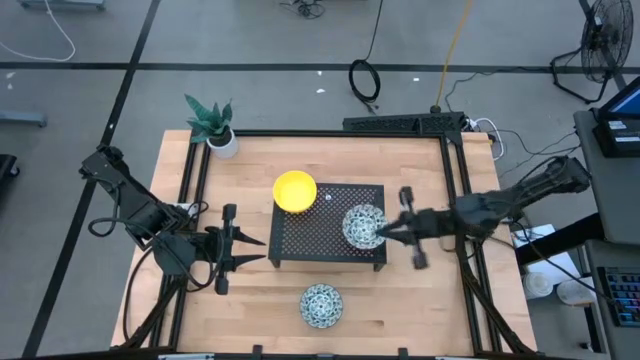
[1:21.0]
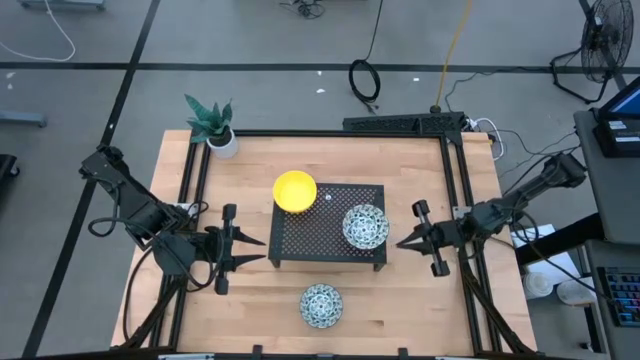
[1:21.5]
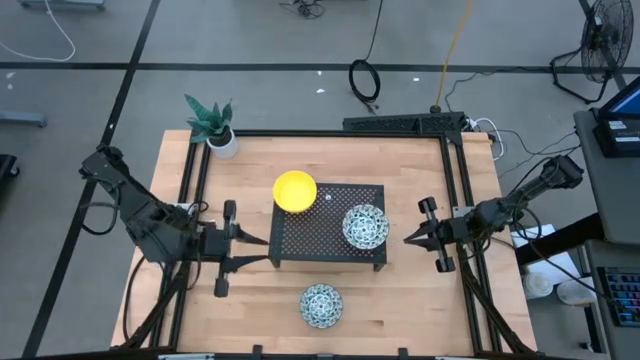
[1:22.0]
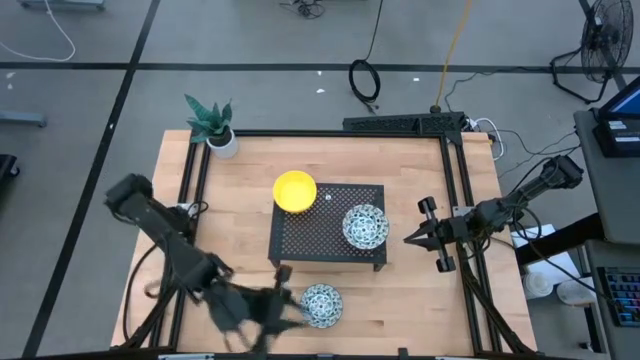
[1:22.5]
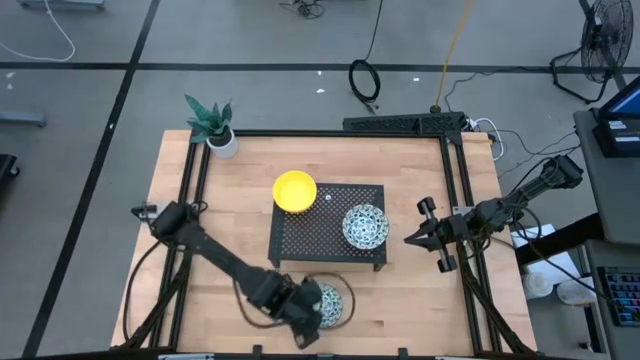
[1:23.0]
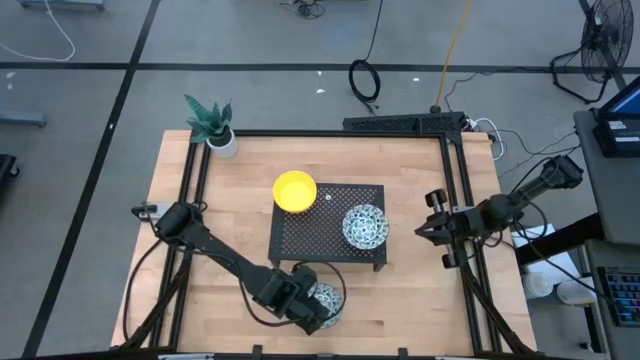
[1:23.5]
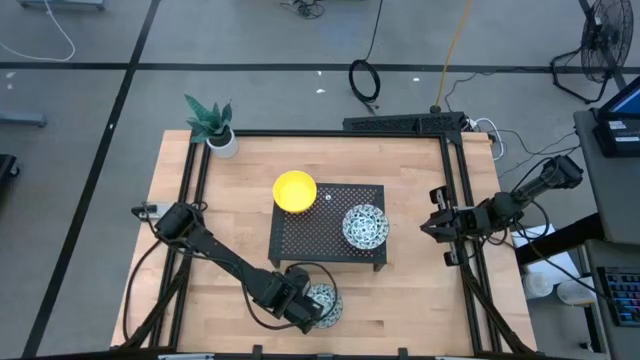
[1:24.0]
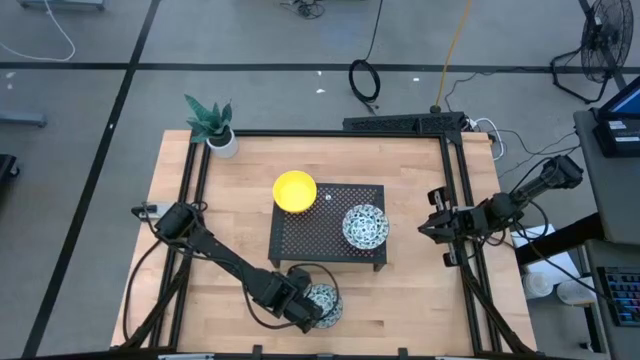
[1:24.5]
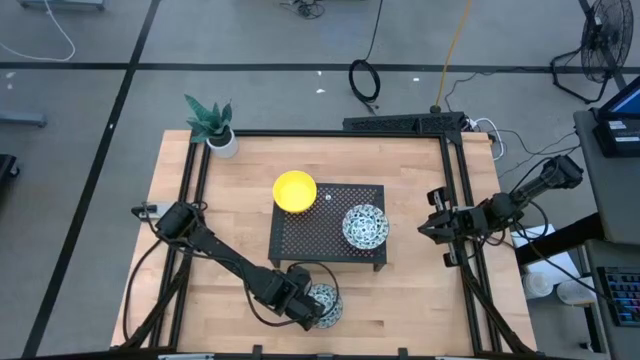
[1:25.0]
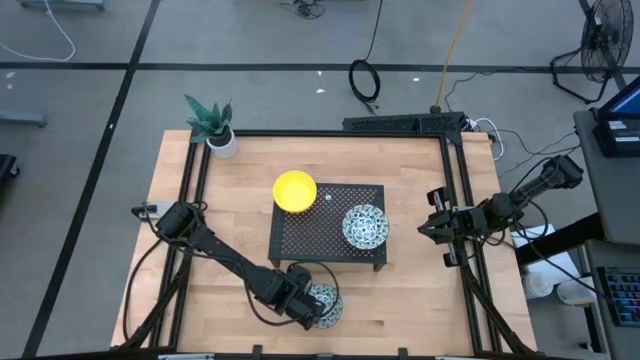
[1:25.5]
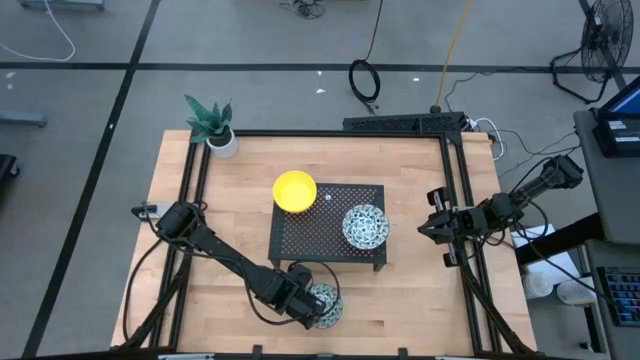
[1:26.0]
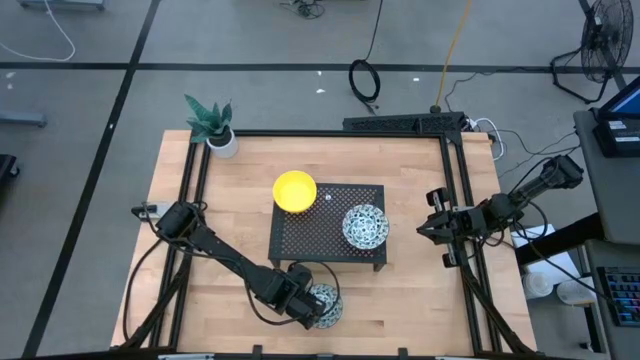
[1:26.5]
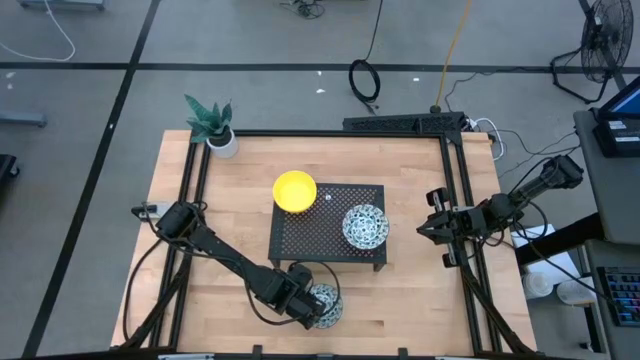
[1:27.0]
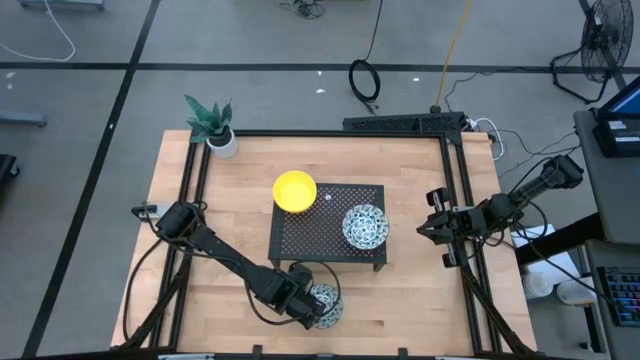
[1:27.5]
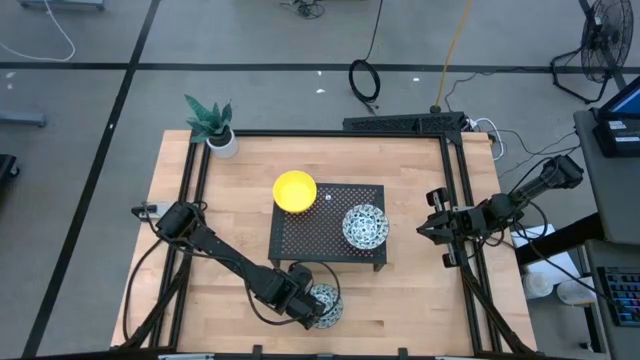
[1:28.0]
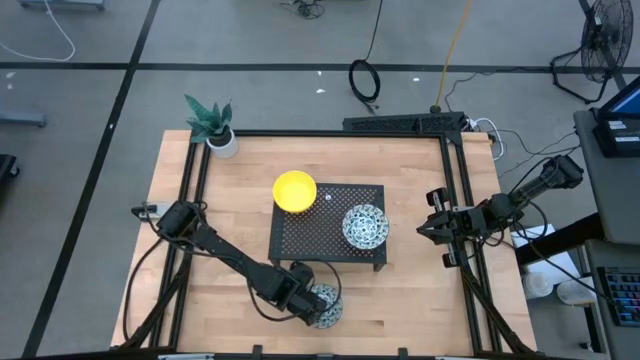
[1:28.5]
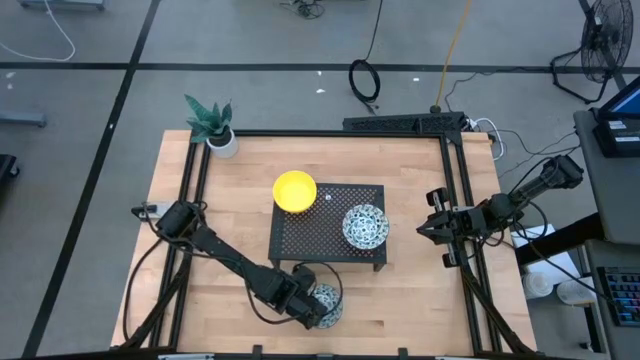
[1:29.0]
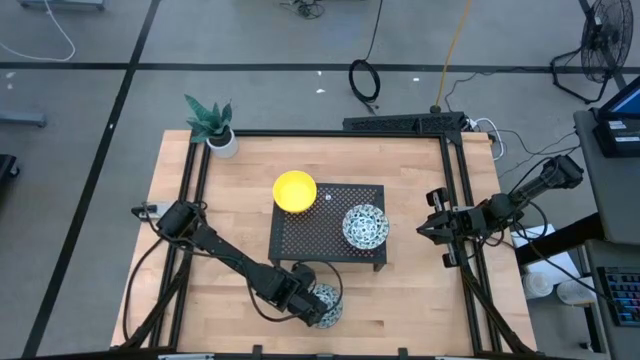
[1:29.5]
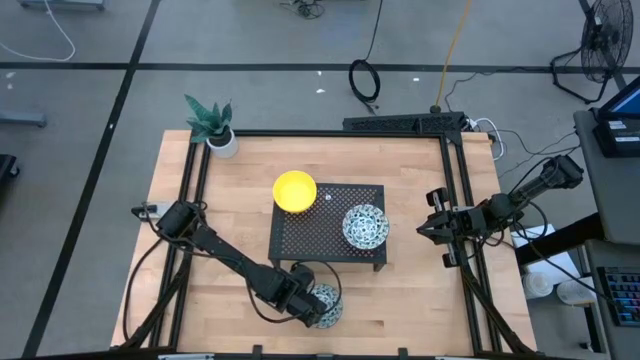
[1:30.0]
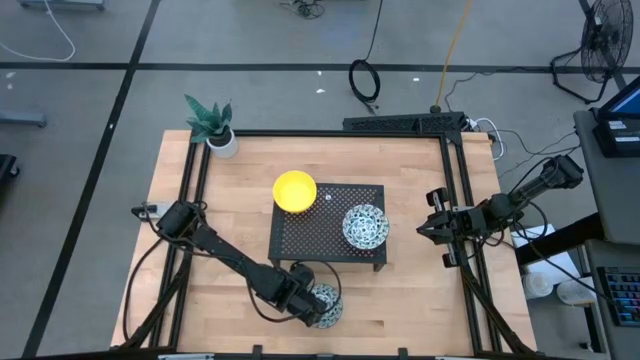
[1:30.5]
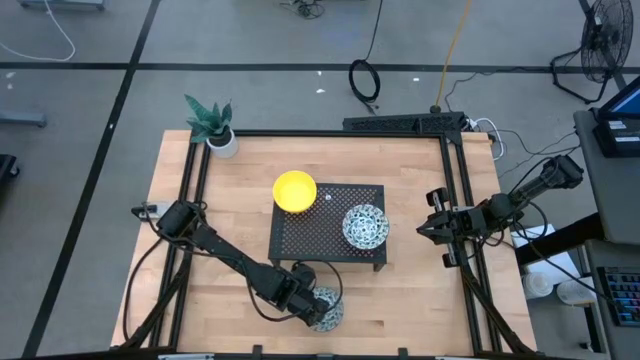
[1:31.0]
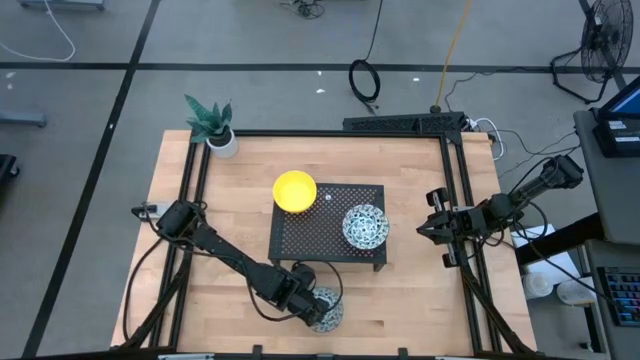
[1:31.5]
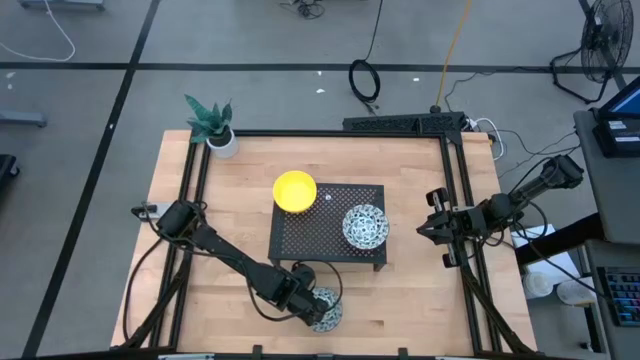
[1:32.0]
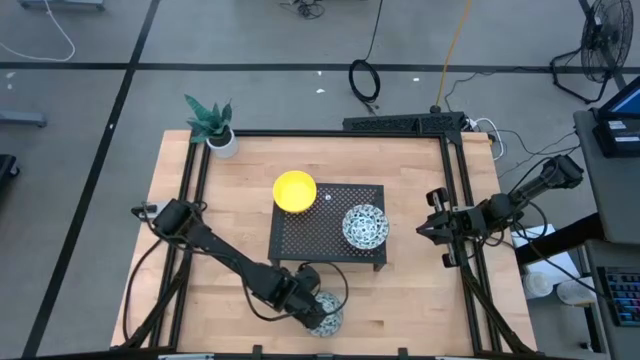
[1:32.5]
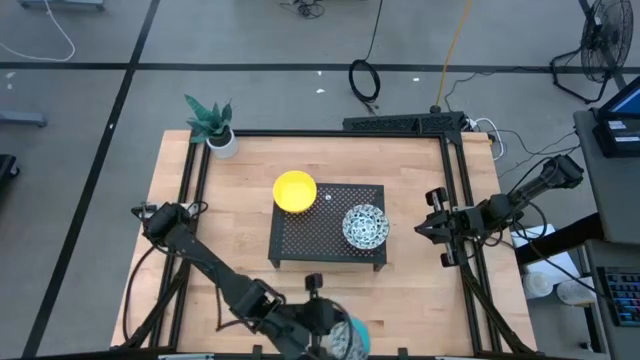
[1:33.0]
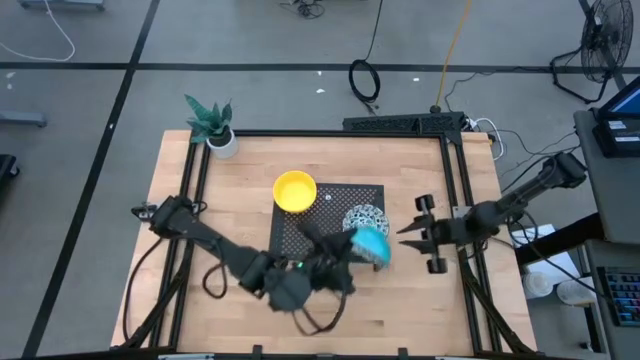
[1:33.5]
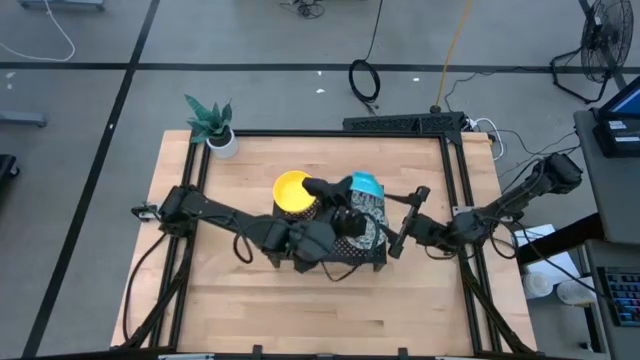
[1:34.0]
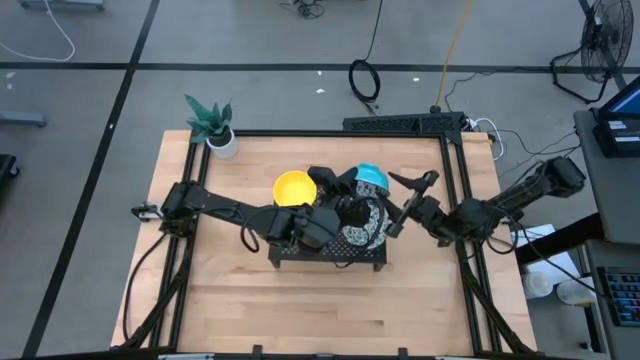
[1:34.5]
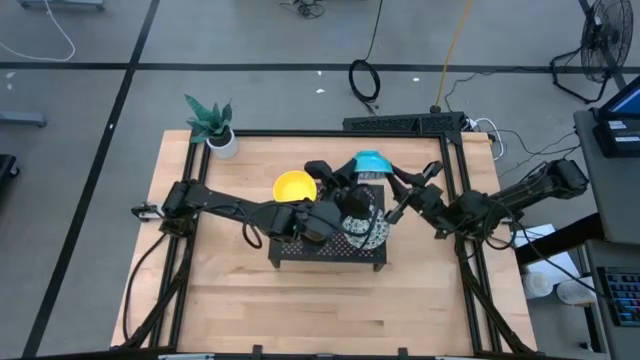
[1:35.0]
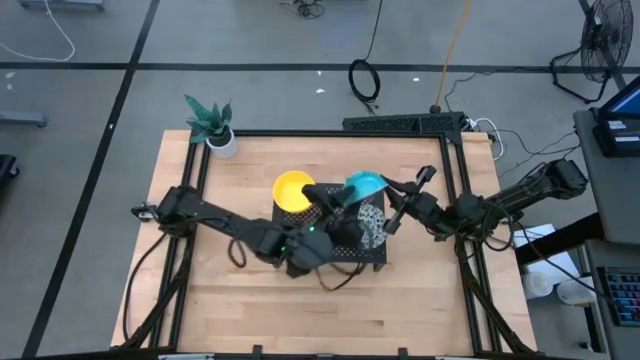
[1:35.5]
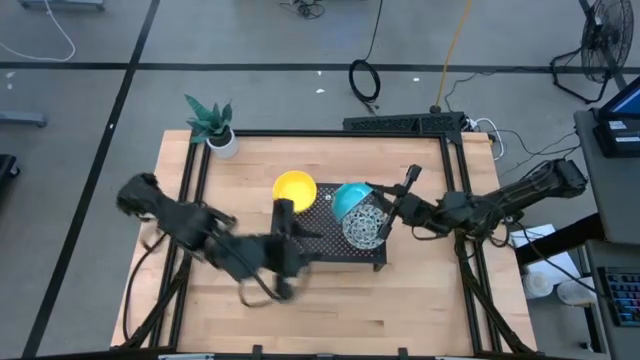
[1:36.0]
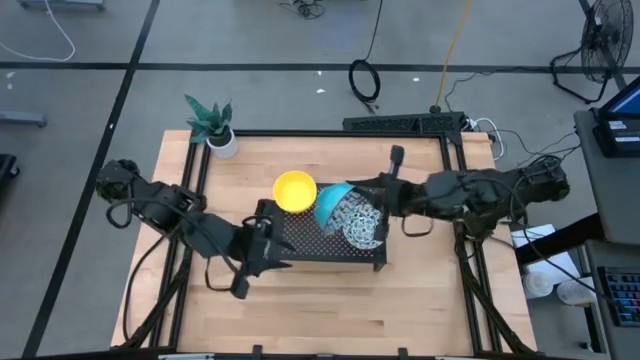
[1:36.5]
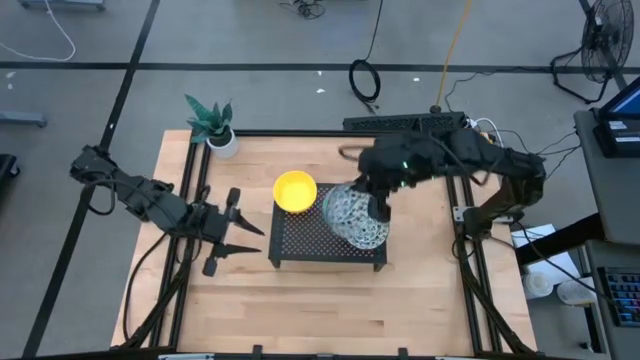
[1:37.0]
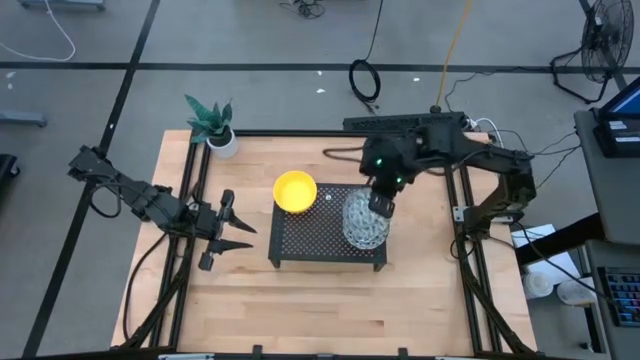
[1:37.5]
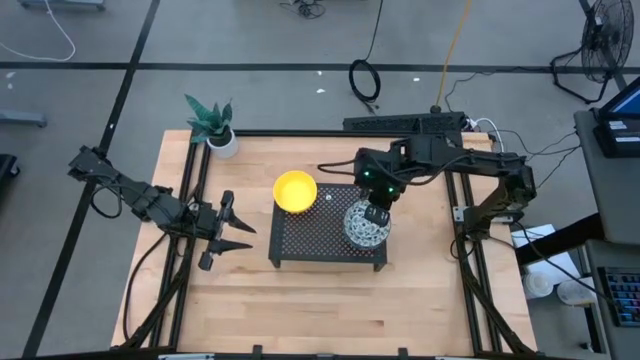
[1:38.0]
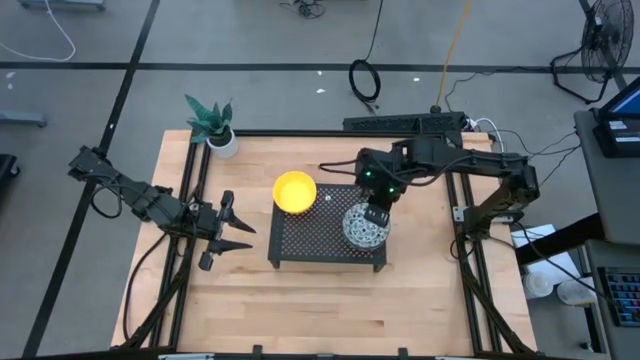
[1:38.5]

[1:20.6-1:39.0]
Task: Pick & Place Mini bowls
Stack the white patterned bowl on top of the white patterned bowl on the shelf

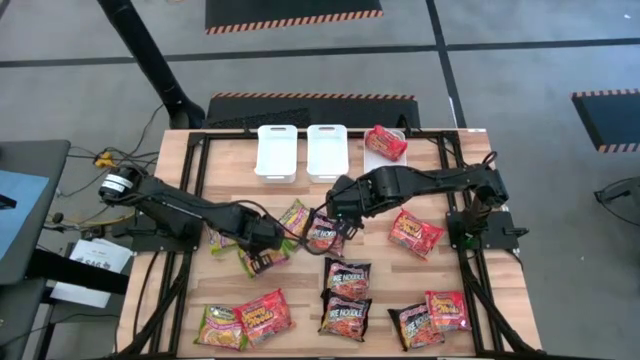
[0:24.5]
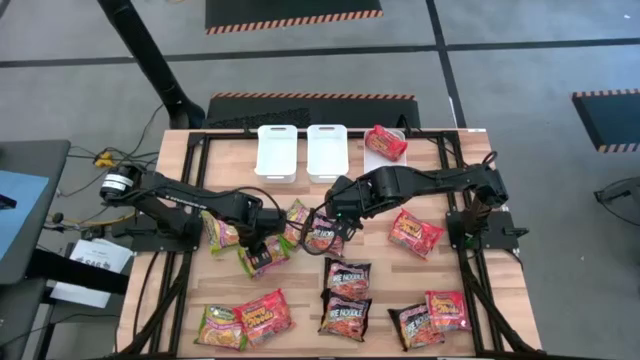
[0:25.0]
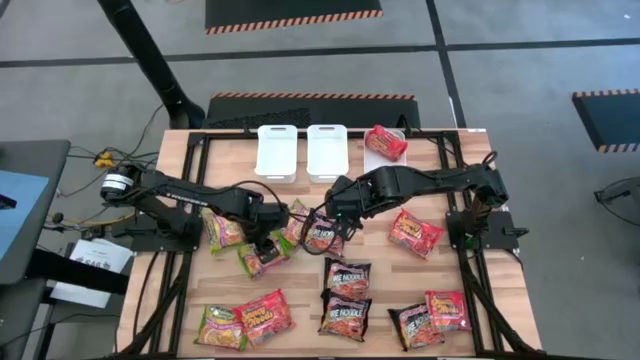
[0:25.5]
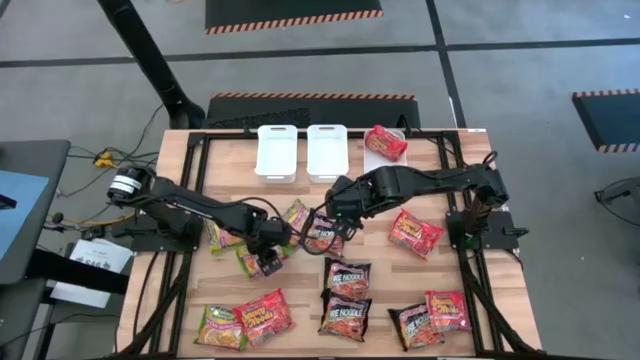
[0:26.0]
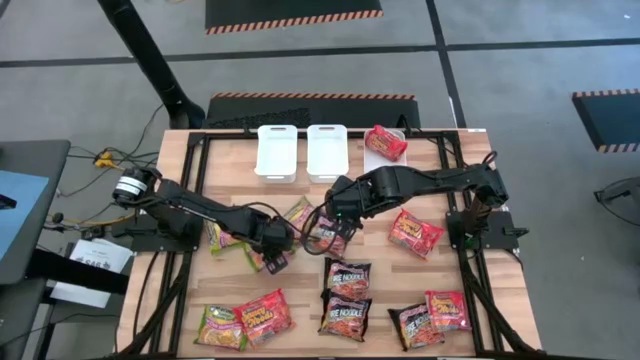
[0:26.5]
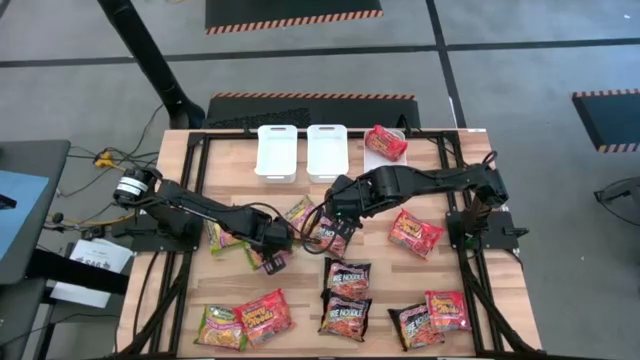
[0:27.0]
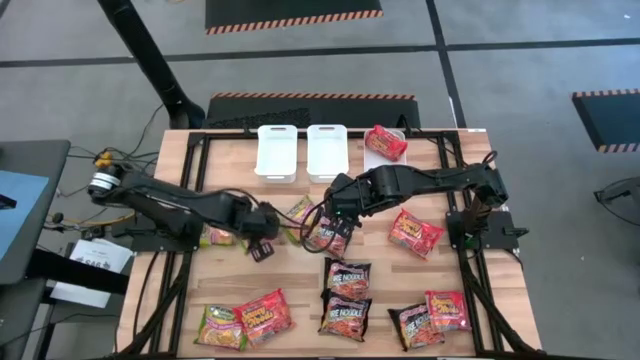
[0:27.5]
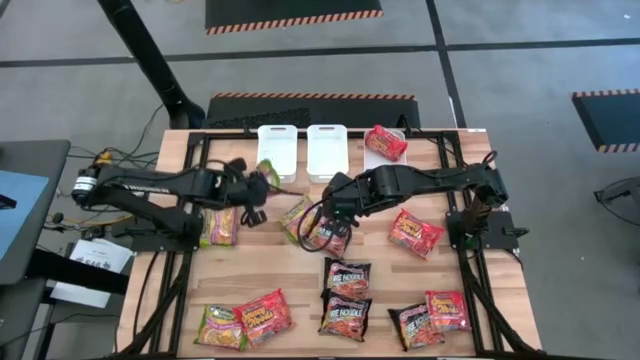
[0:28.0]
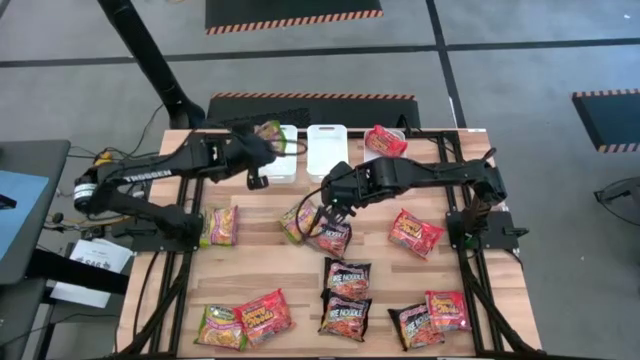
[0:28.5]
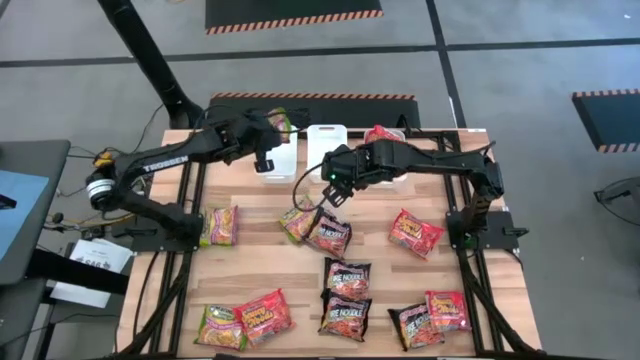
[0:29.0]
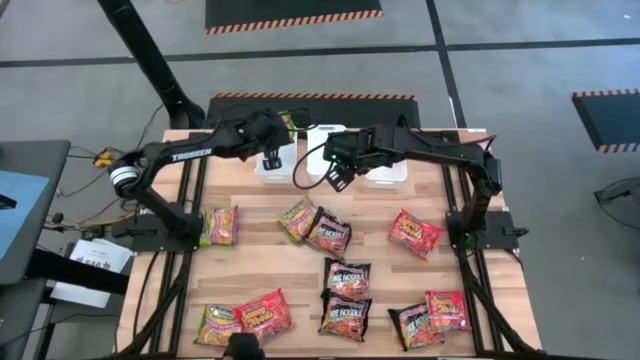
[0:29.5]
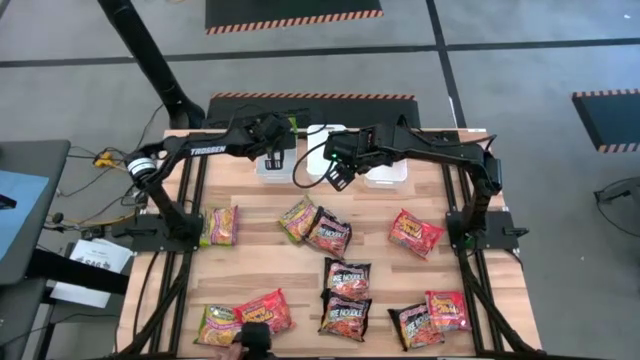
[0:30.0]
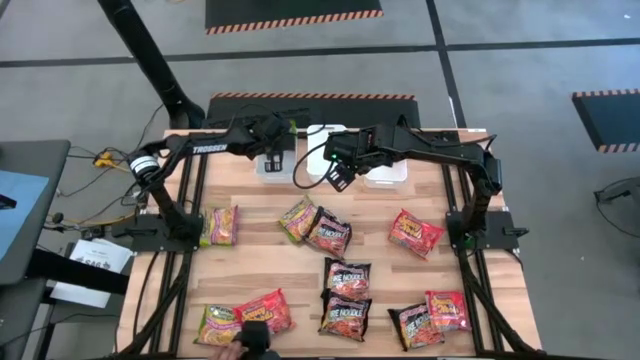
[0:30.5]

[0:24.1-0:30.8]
Task: Sort Maruchan noodles
Put the green noodle pack into the left white bin
